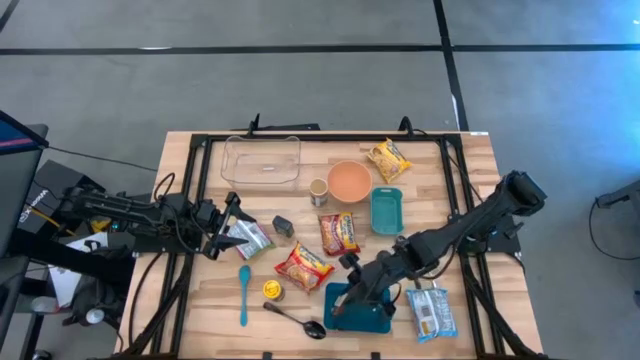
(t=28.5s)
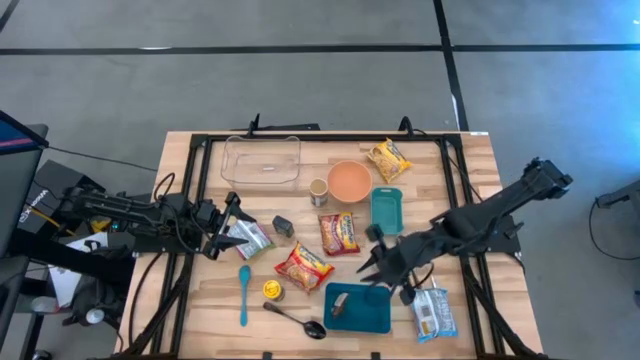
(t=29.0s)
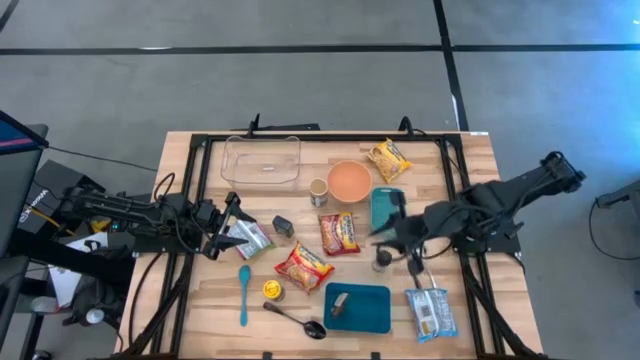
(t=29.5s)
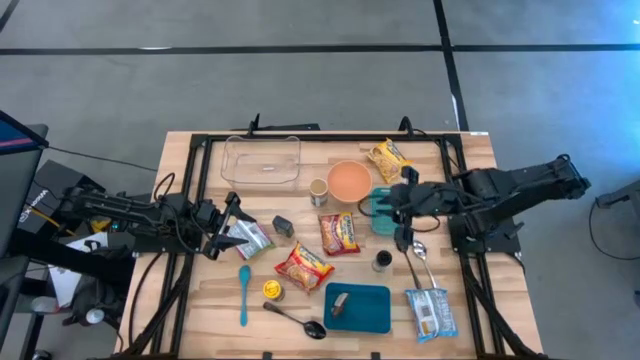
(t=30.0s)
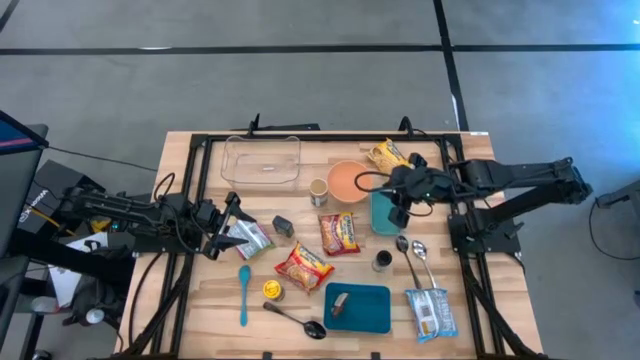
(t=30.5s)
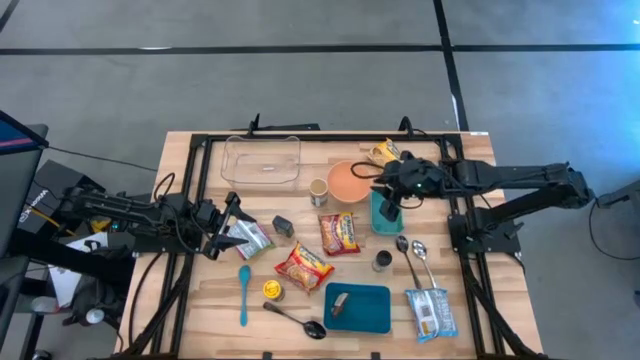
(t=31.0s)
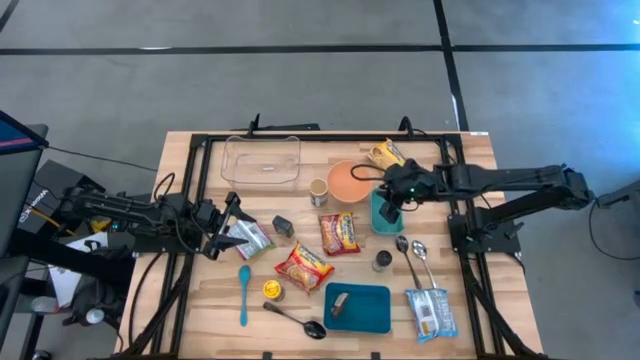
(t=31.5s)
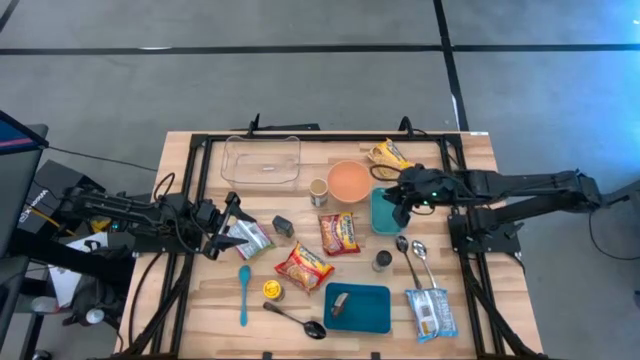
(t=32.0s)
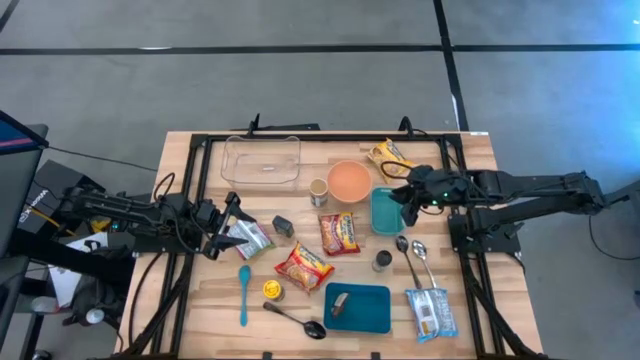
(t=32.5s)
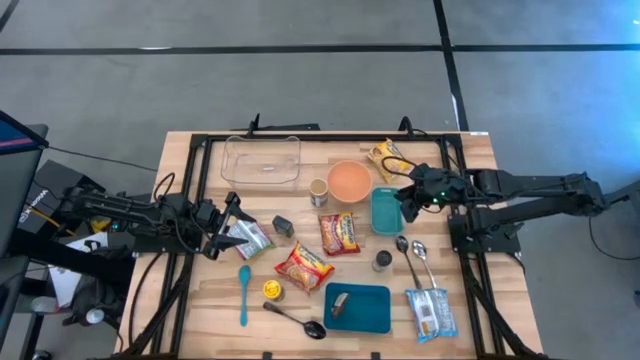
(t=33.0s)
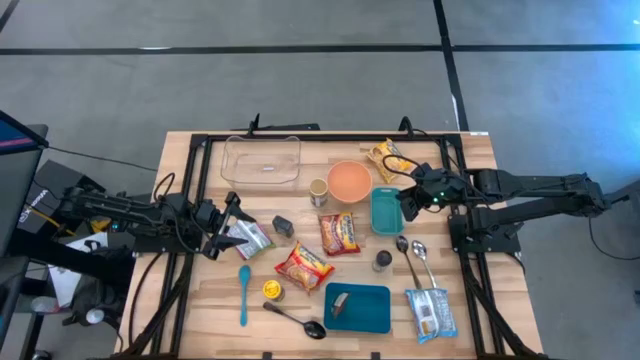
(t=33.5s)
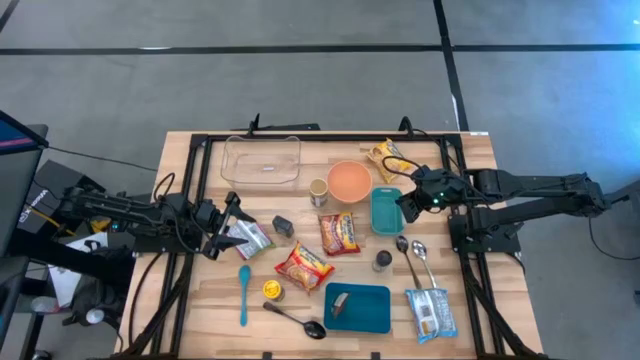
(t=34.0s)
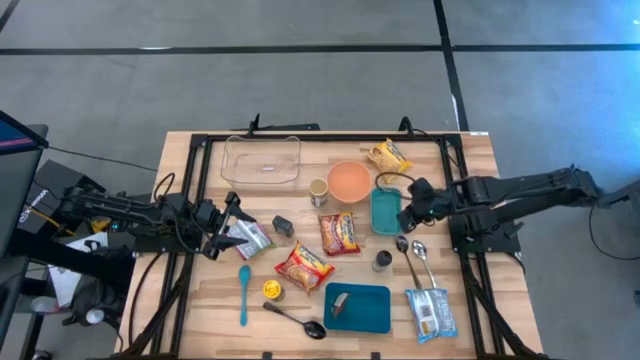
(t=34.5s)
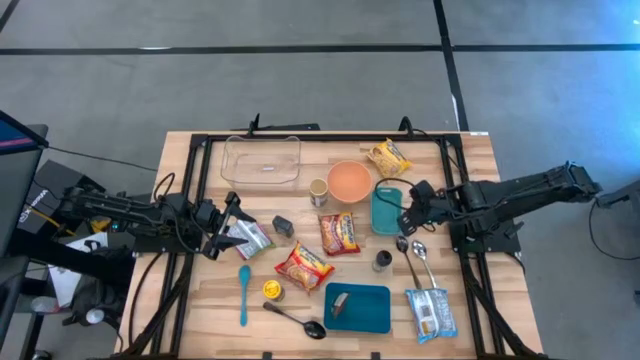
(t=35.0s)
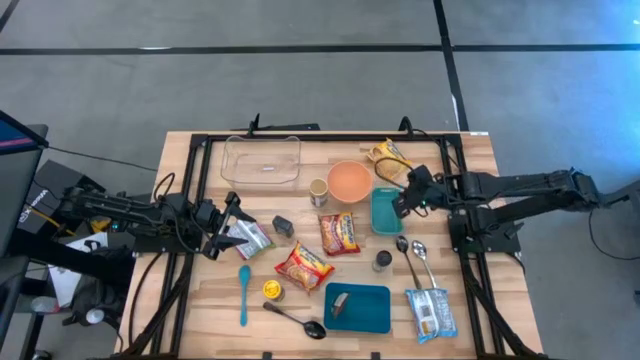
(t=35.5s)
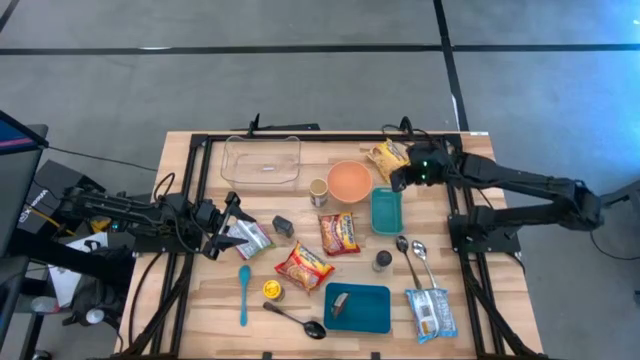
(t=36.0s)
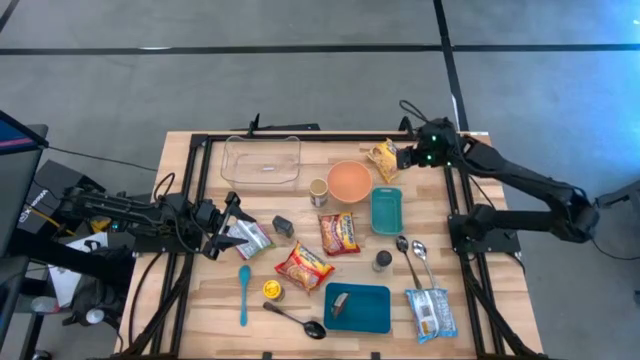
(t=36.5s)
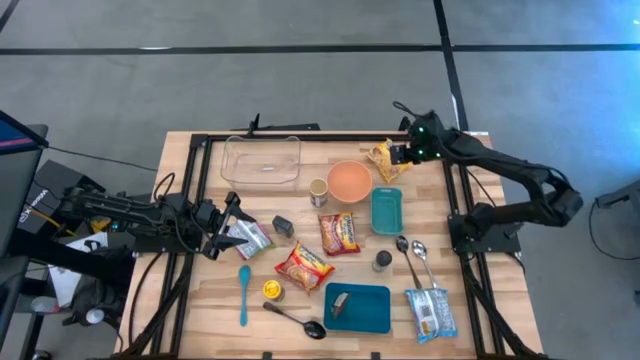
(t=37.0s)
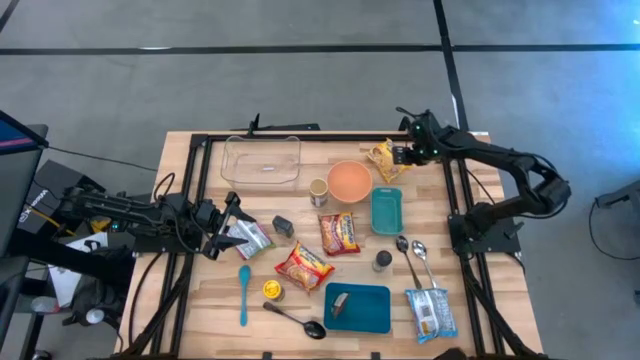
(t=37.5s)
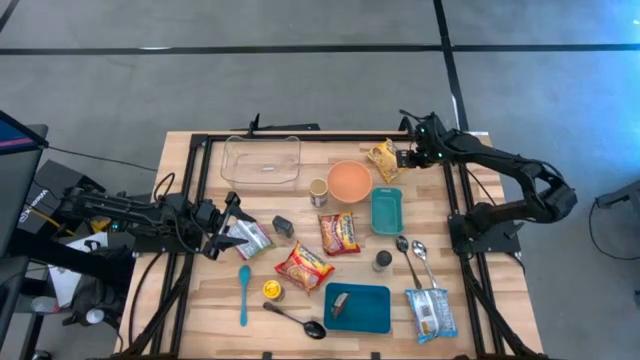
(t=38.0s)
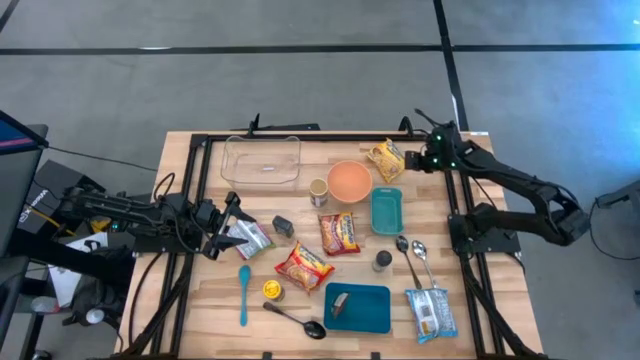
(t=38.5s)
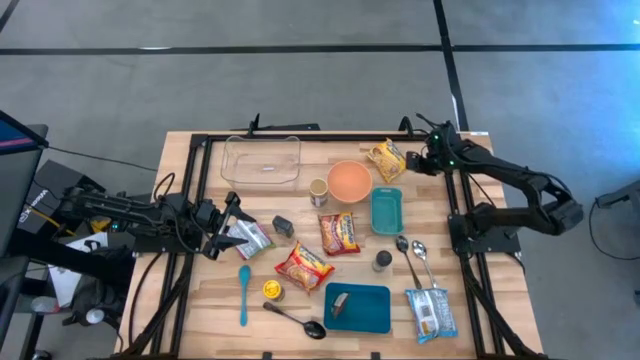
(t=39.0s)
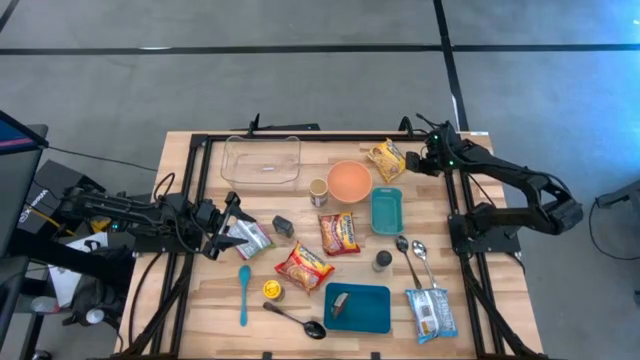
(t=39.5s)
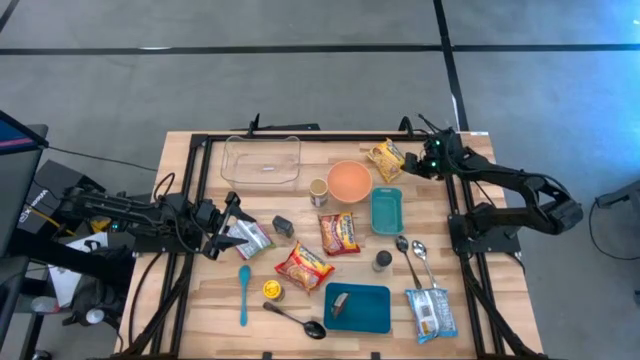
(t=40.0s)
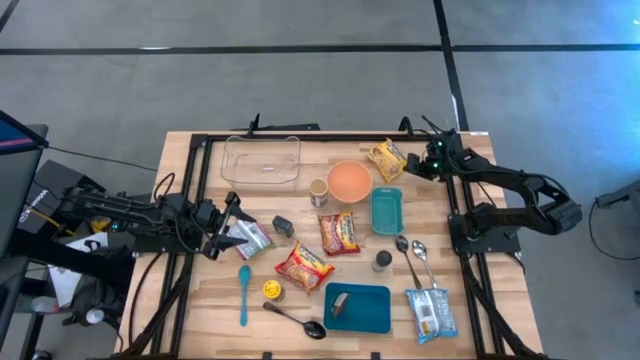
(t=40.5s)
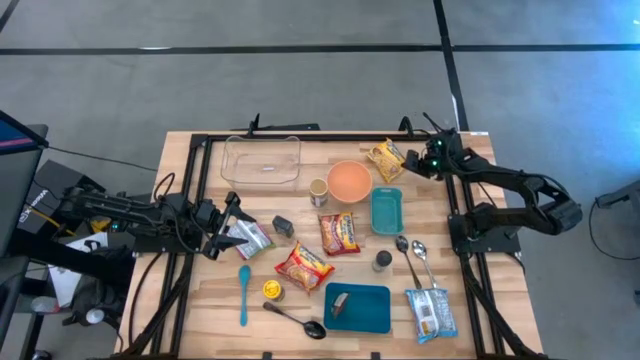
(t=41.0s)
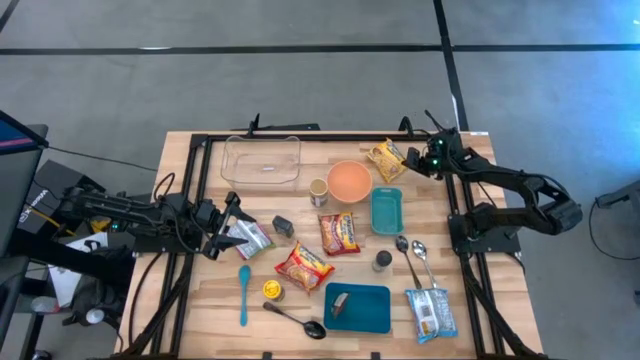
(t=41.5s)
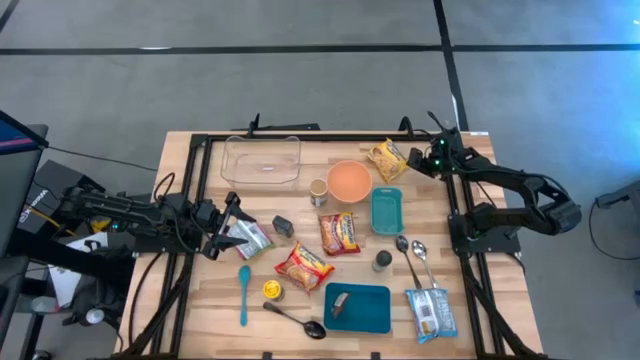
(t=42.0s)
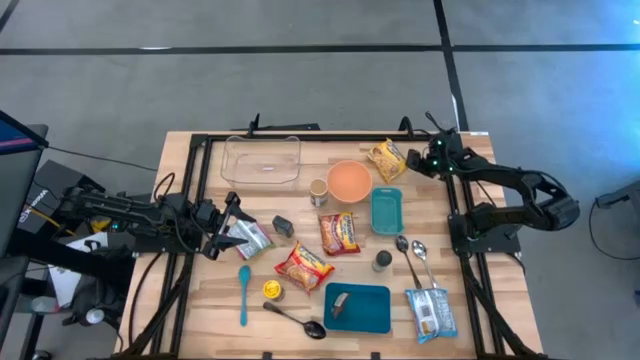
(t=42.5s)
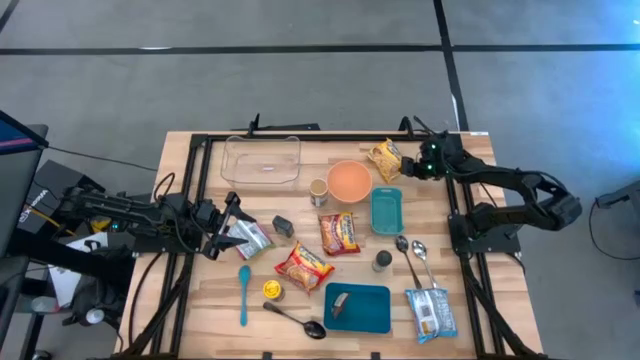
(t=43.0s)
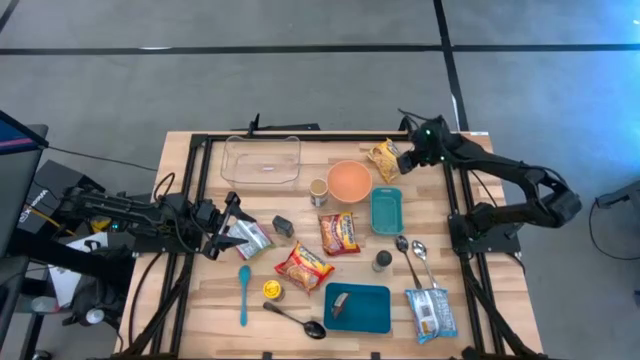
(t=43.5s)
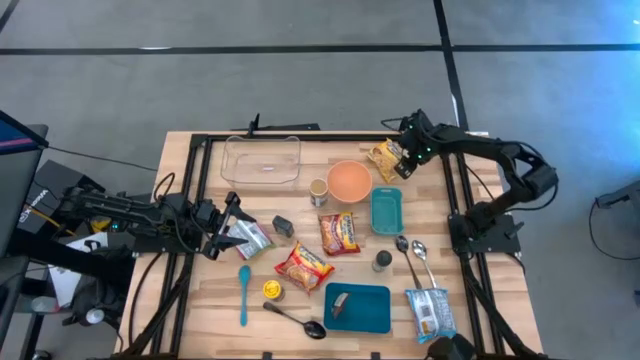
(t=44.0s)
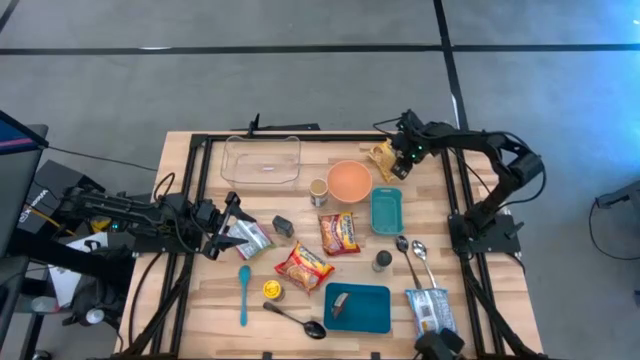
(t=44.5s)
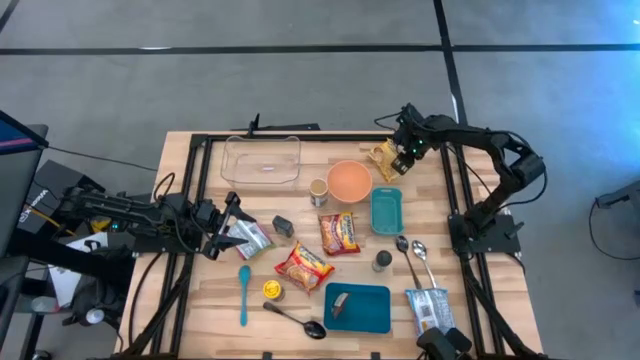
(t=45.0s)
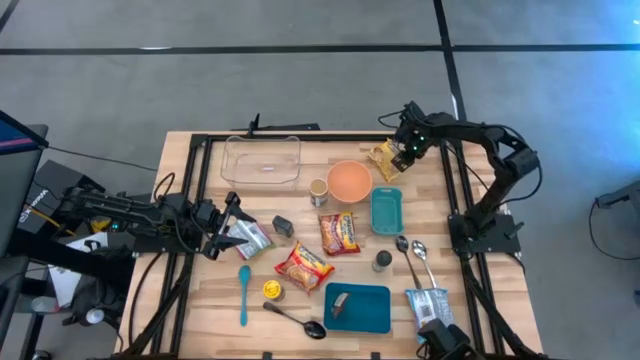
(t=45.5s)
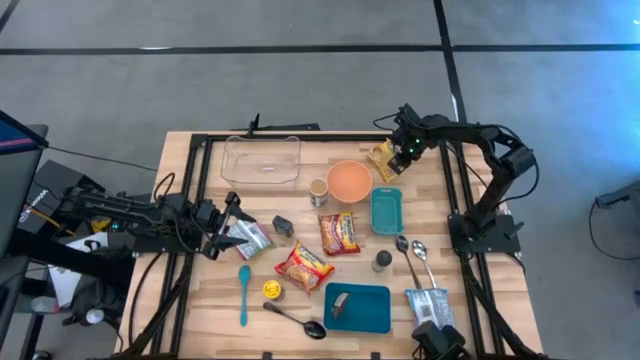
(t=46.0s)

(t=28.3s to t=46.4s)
Task: Pick & Place Food Item
Put the yellow noodle pack into the transparent bin

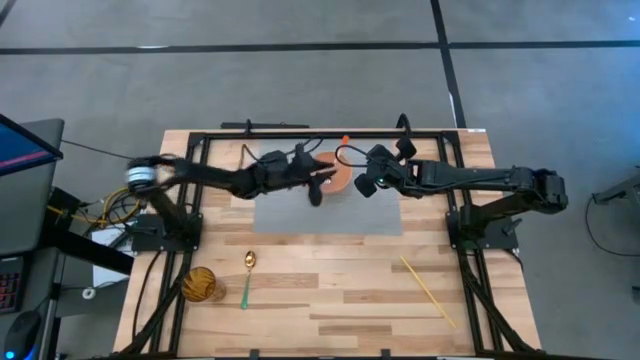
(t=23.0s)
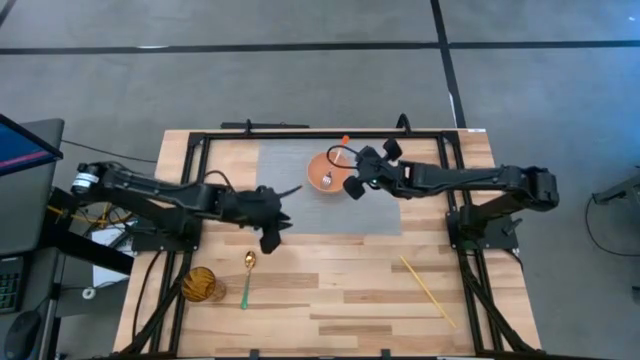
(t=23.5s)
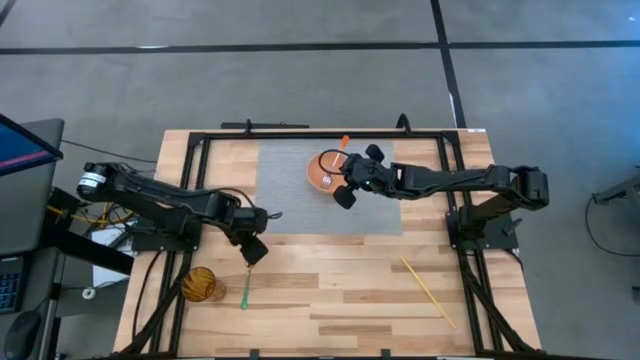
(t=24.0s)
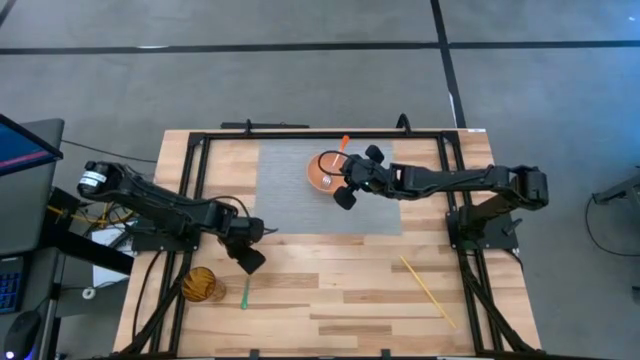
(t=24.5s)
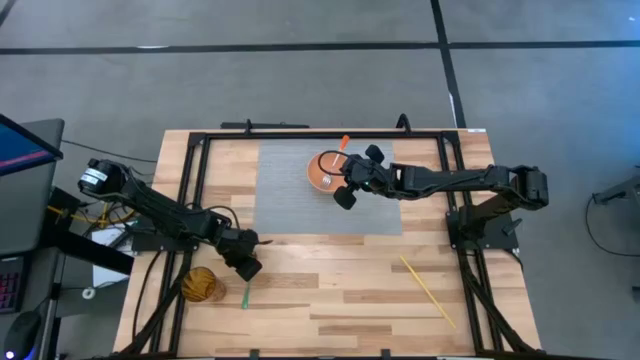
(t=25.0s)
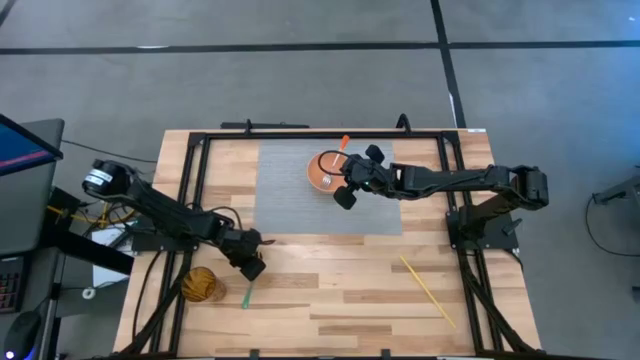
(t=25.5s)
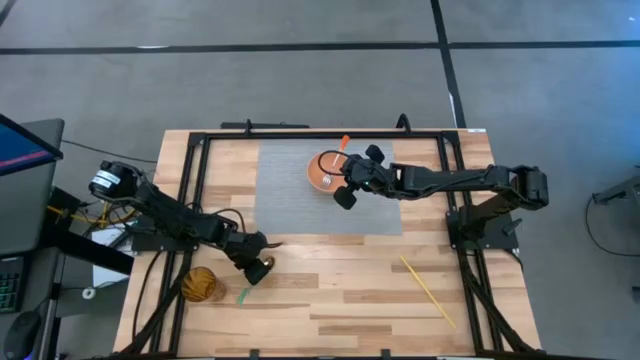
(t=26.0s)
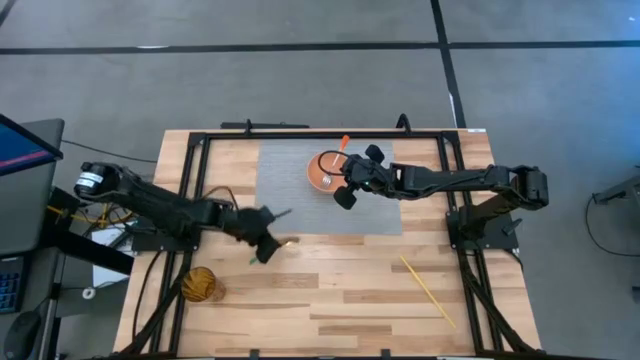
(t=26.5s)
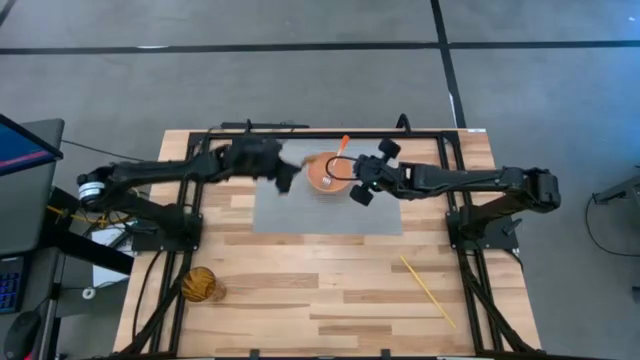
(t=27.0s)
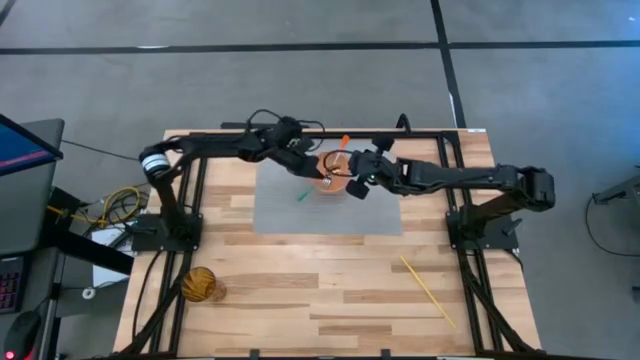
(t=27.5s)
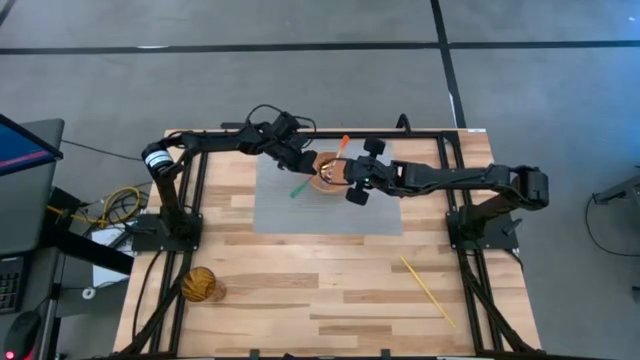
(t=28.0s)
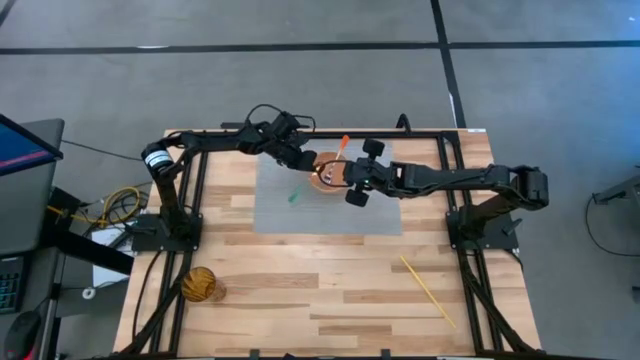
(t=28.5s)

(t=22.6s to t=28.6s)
Task: Pick & Place Utensil
Put the green spoon into the brown bowl
